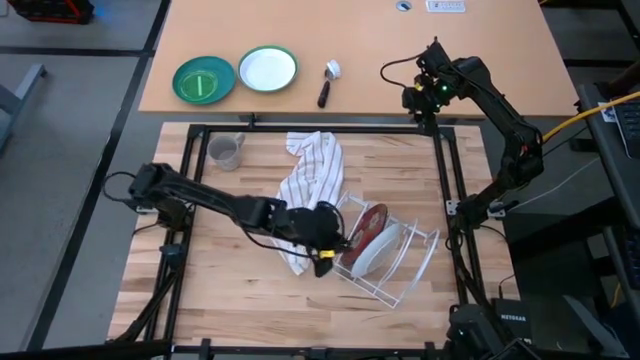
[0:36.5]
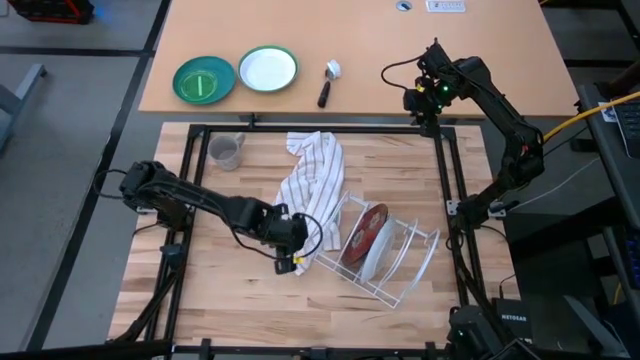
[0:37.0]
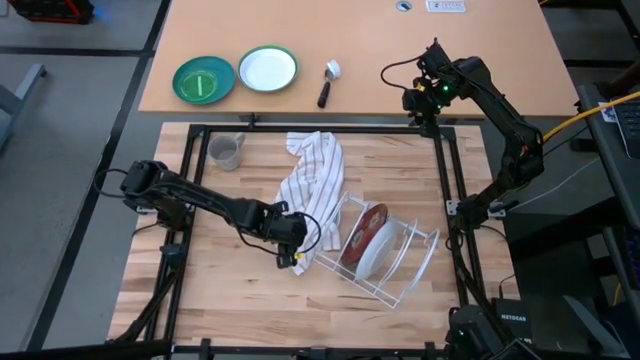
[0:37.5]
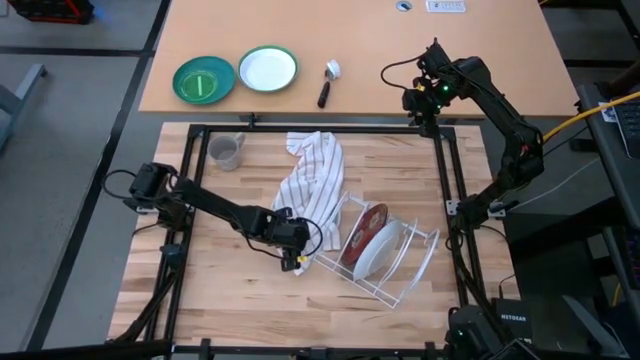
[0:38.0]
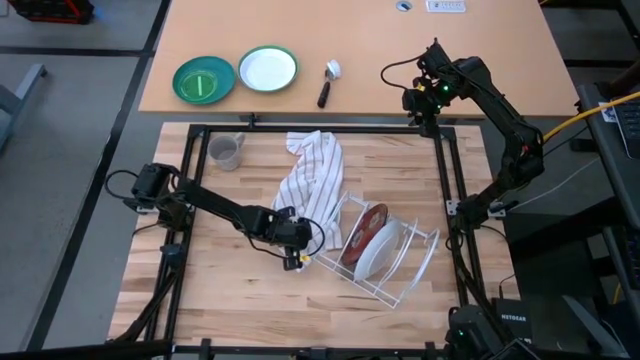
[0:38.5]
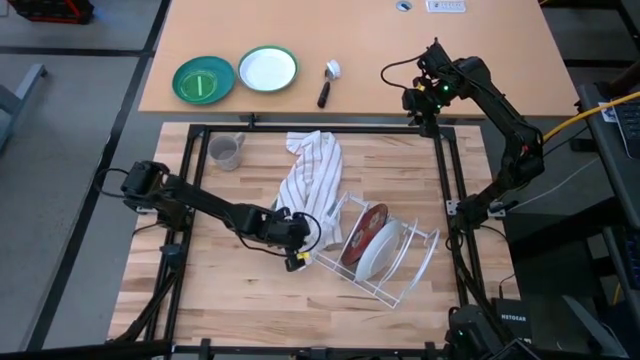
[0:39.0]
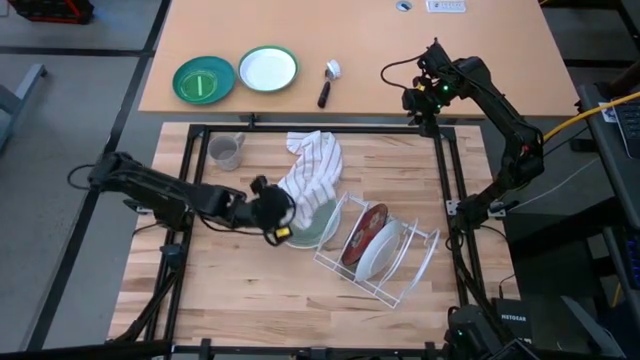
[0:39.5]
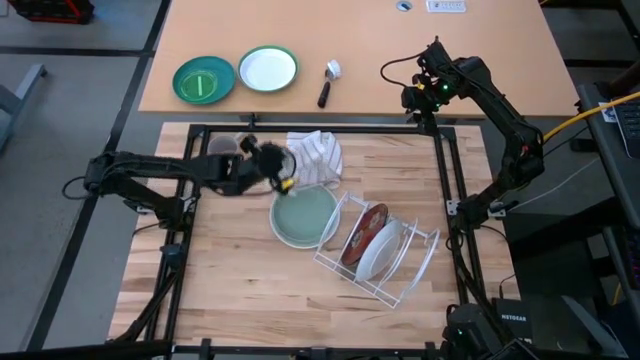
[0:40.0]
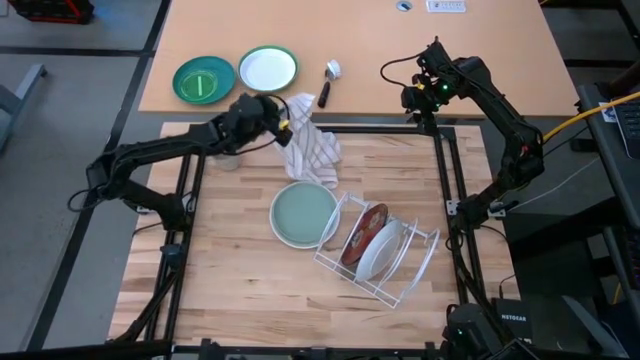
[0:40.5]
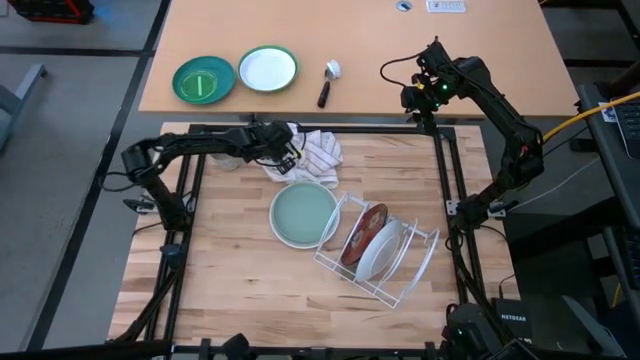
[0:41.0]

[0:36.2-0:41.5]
Task: Sort dishes
Move the napkin to the top

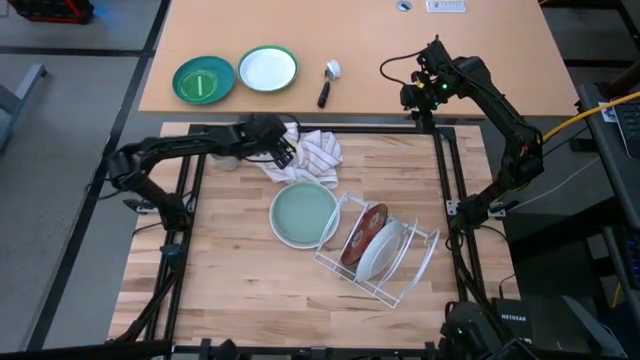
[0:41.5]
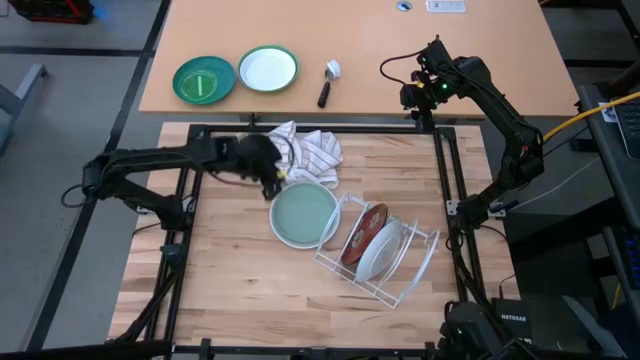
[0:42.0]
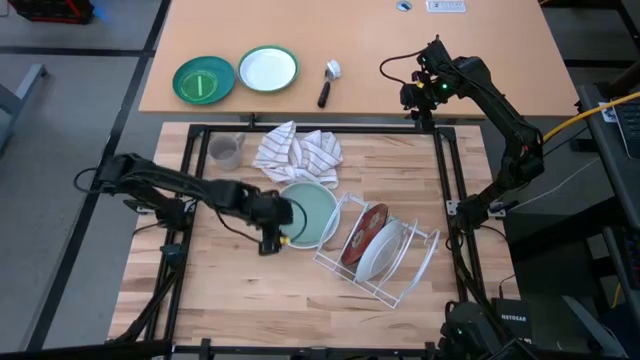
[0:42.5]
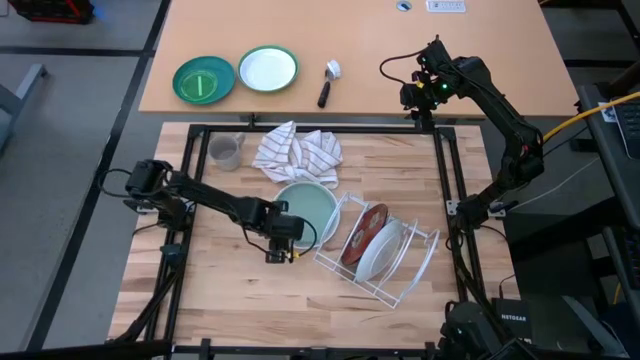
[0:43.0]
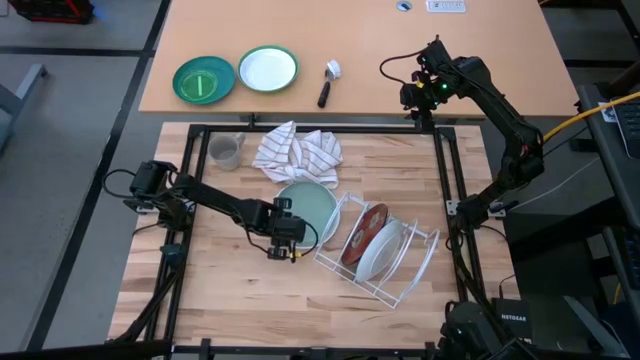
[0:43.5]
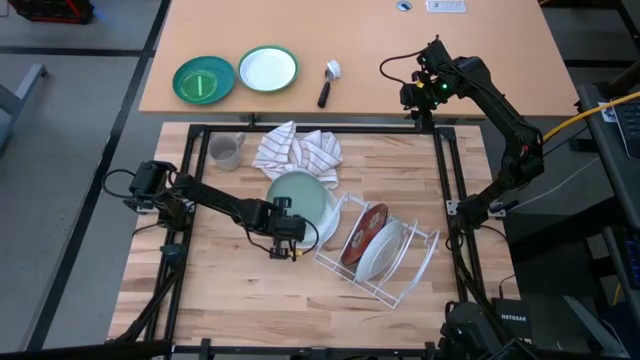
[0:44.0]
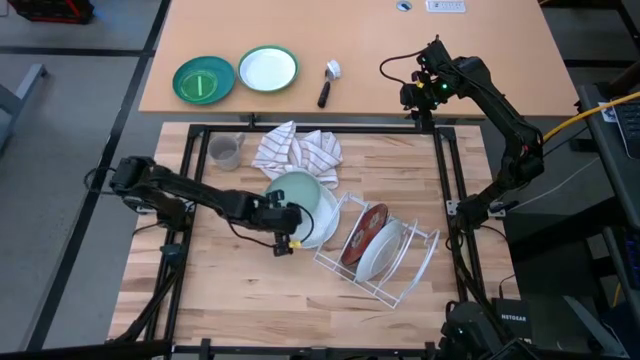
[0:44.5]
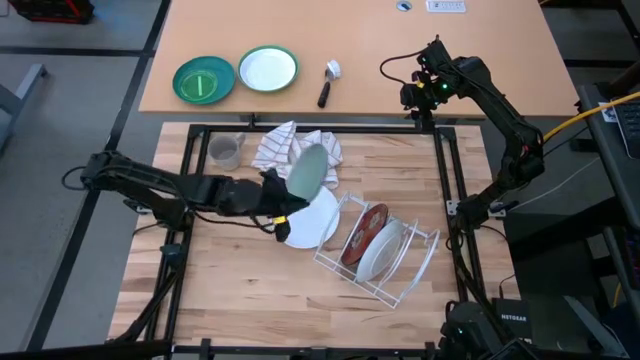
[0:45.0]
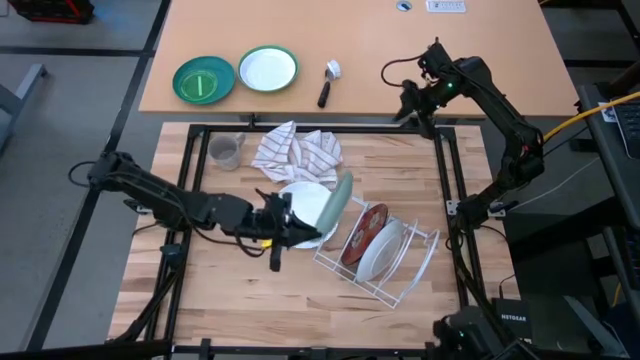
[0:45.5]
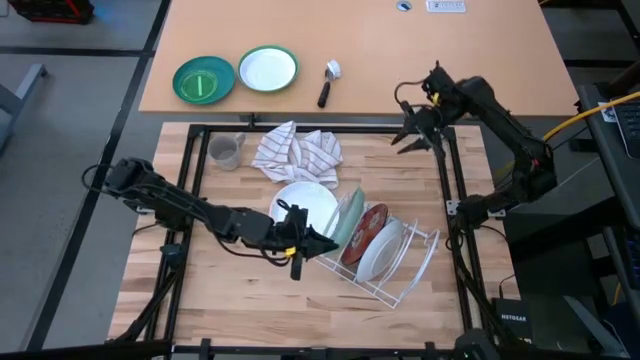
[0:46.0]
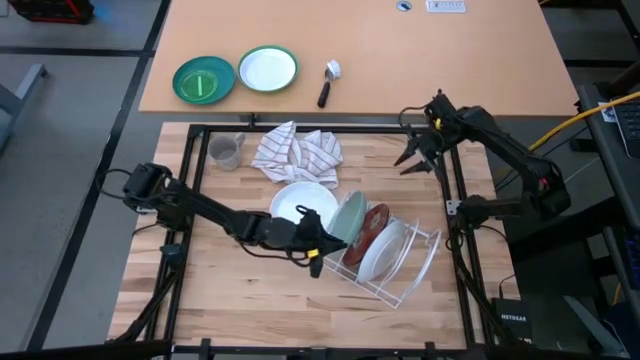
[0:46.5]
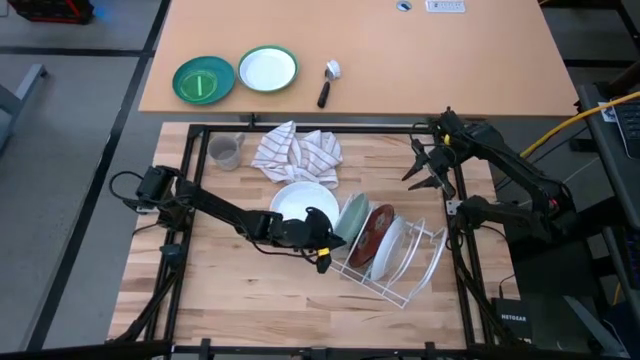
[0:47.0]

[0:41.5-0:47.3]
Put the green plate into the dish rack

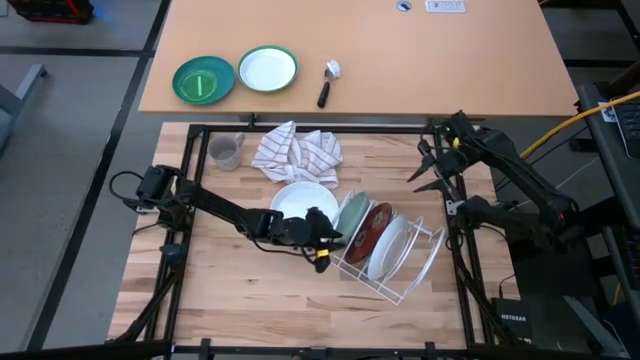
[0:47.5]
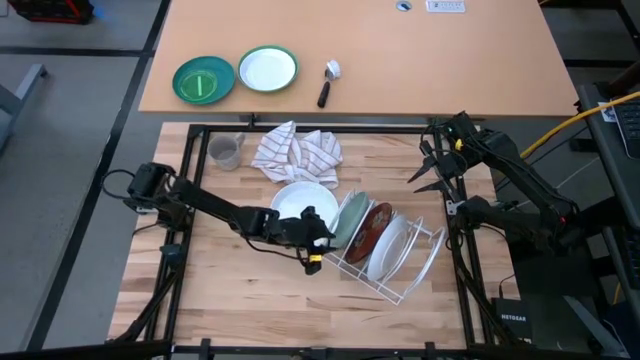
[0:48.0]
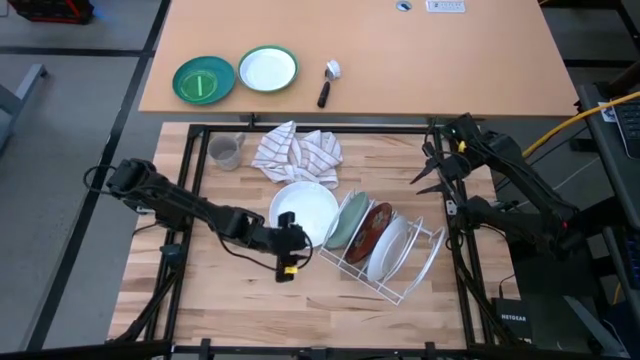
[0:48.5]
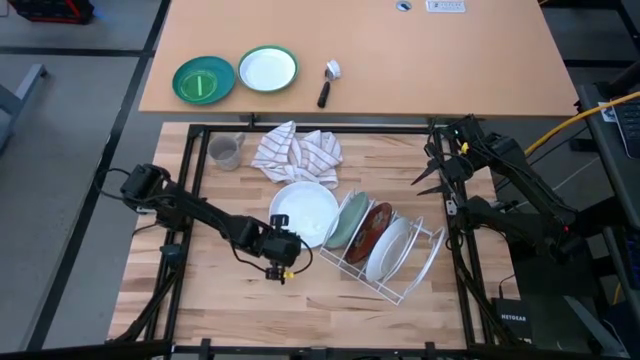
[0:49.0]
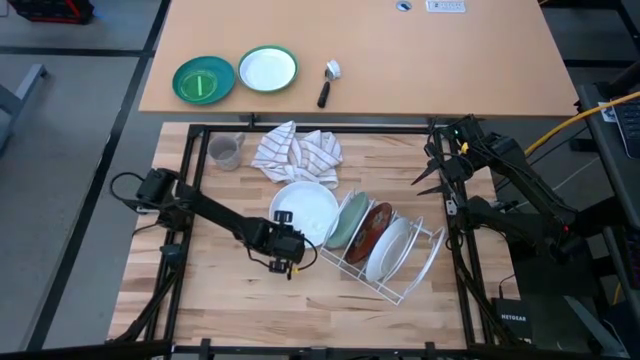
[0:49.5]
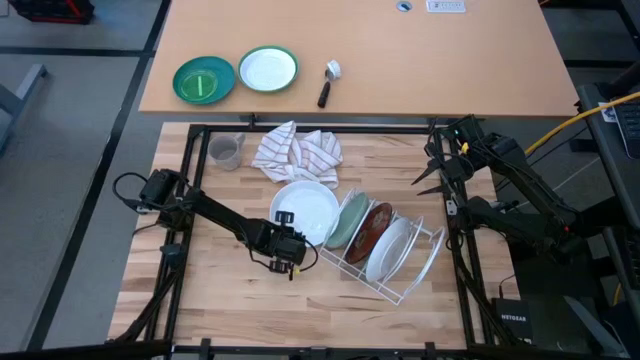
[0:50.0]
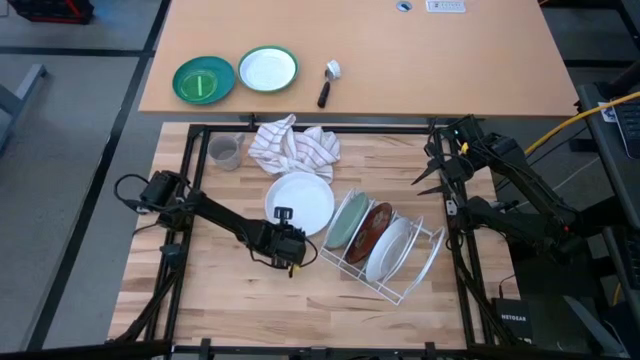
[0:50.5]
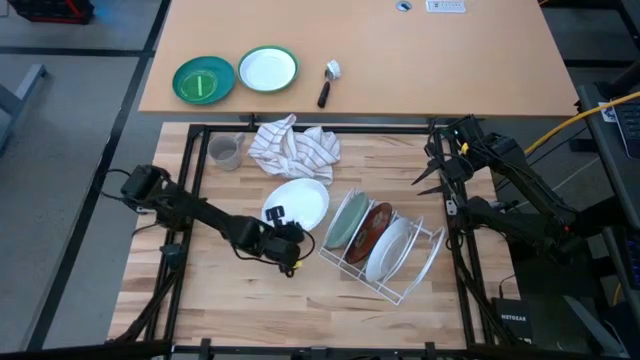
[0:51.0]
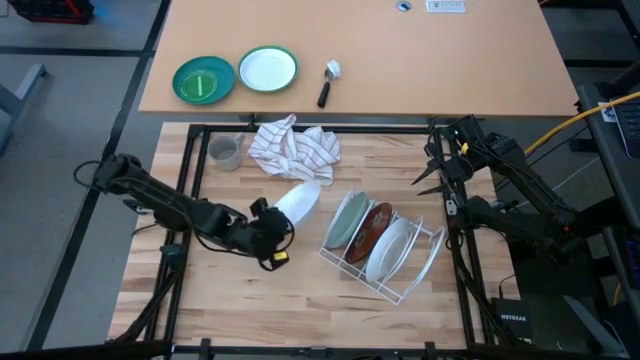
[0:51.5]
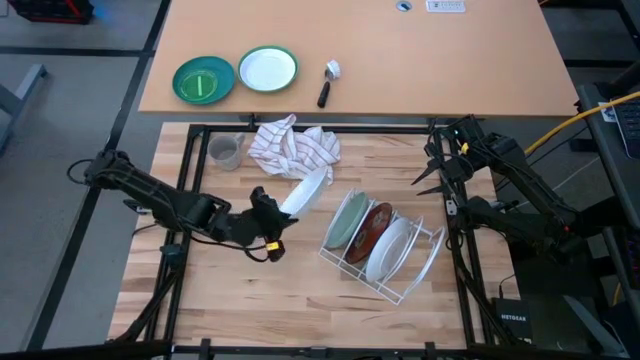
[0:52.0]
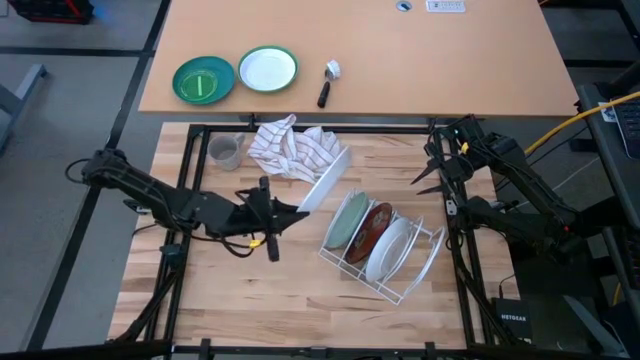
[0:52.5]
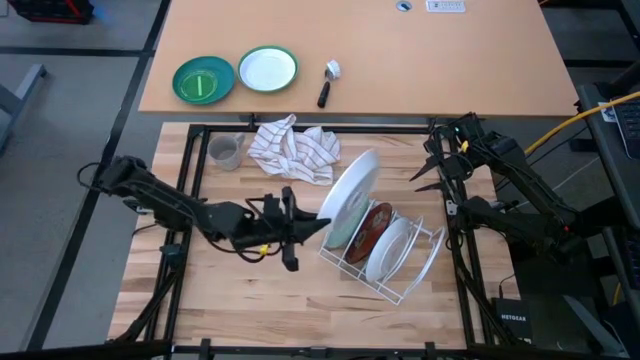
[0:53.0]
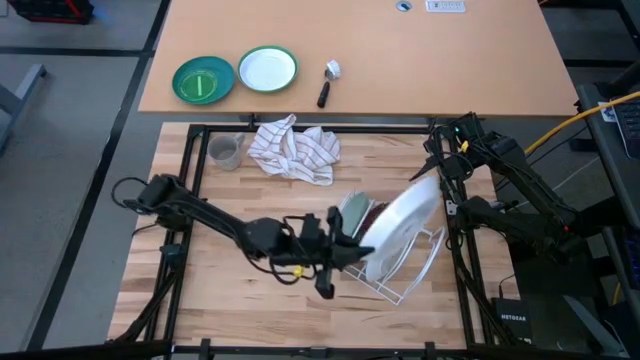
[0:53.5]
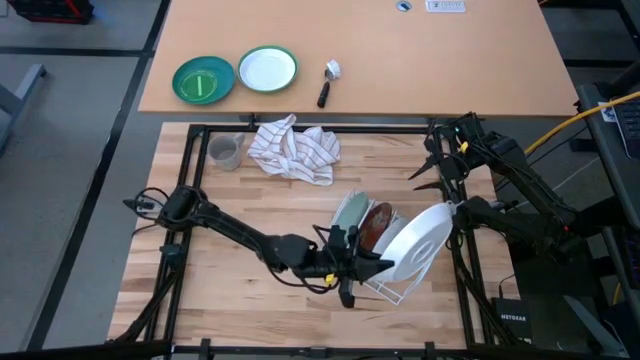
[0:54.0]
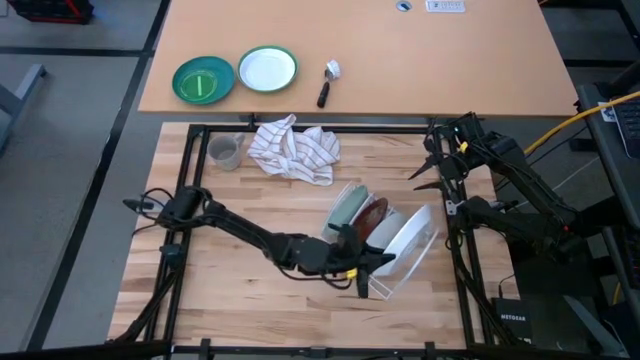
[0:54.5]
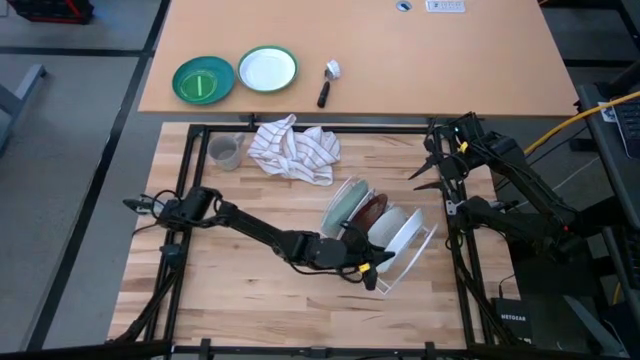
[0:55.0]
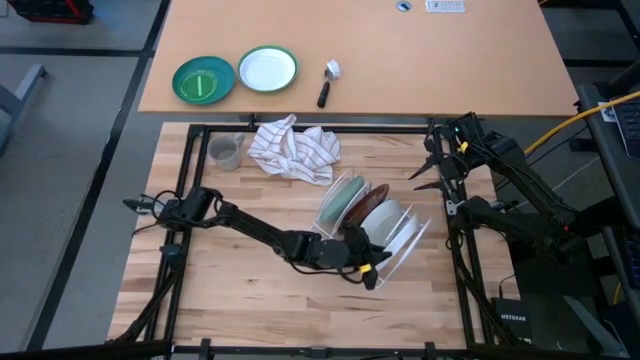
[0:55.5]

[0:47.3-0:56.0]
Put the white plate into the dish rack

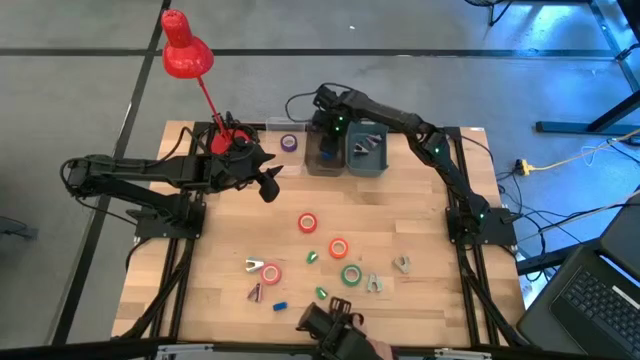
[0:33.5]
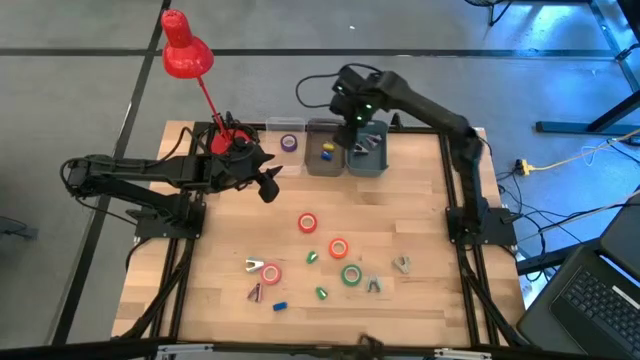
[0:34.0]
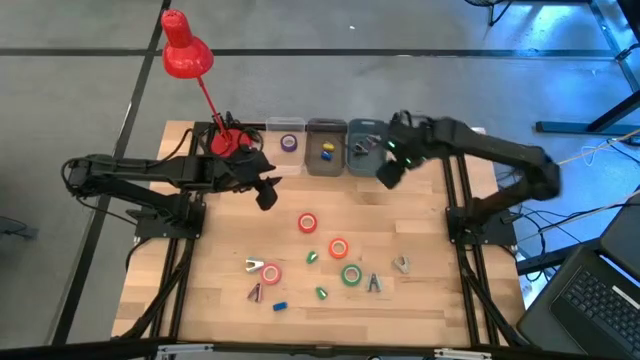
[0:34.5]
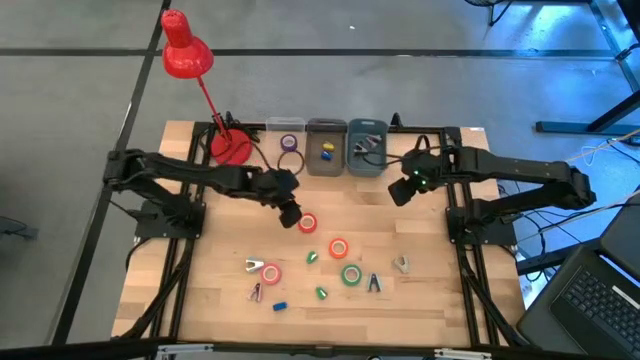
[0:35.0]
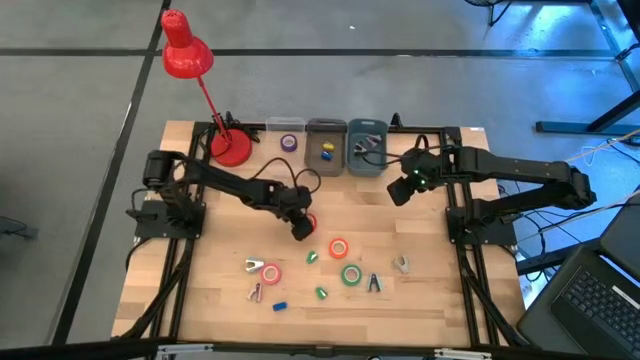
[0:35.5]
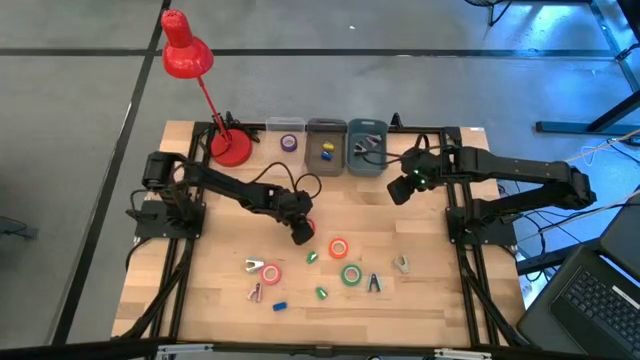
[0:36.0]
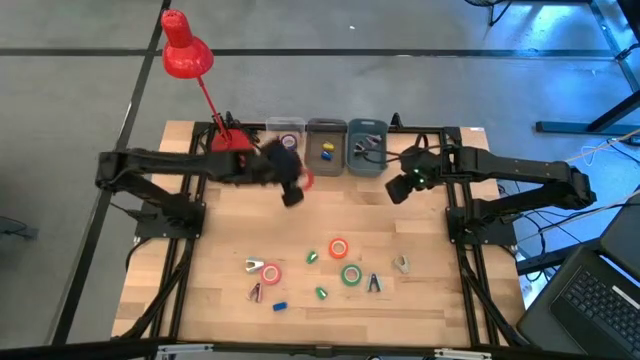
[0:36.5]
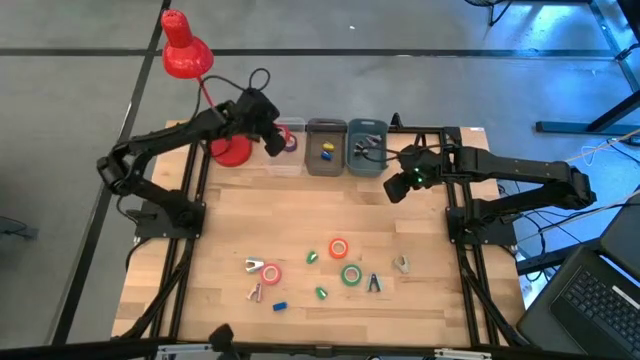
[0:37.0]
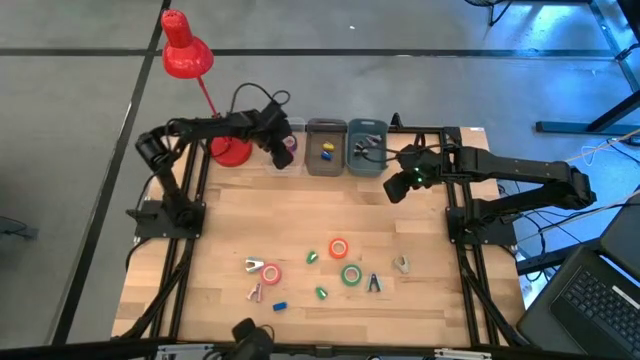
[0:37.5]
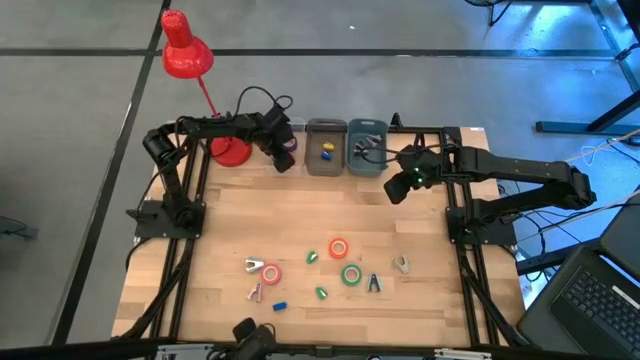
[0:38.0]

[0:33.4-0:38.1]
Task: Pick and place Stapler, Stapler remover, tape
Put the red tape into the transparent bin
